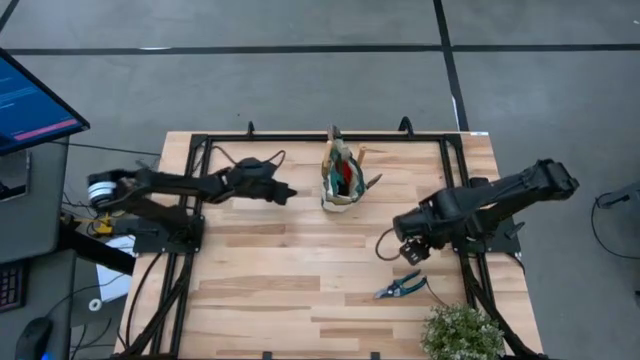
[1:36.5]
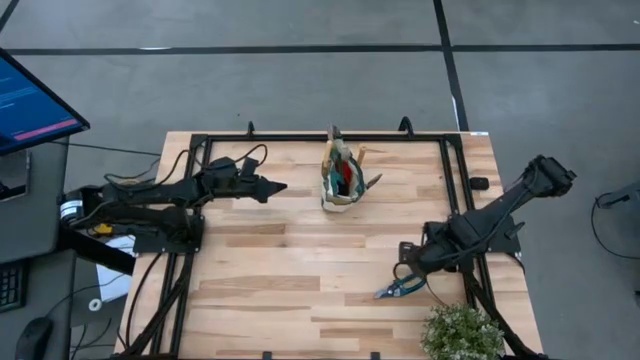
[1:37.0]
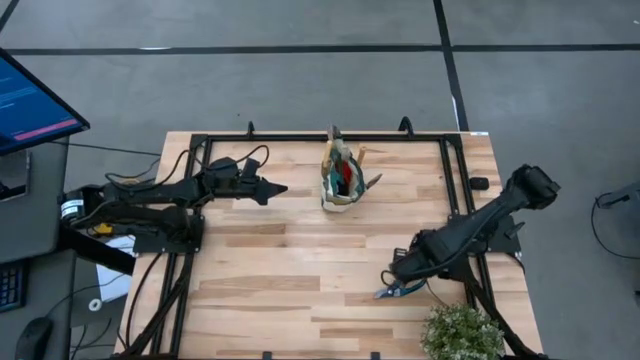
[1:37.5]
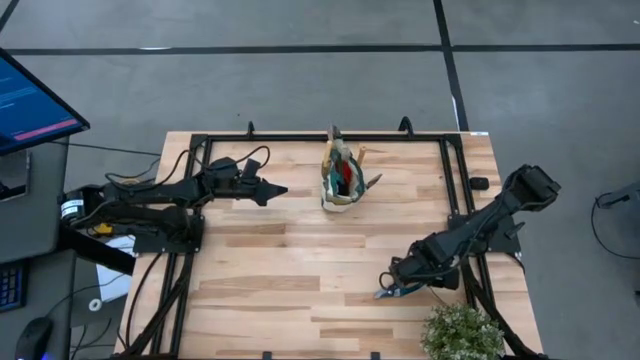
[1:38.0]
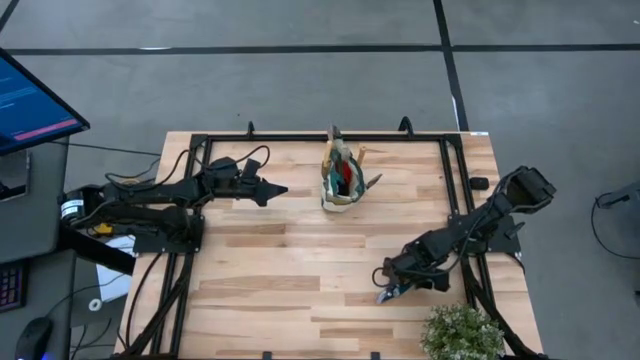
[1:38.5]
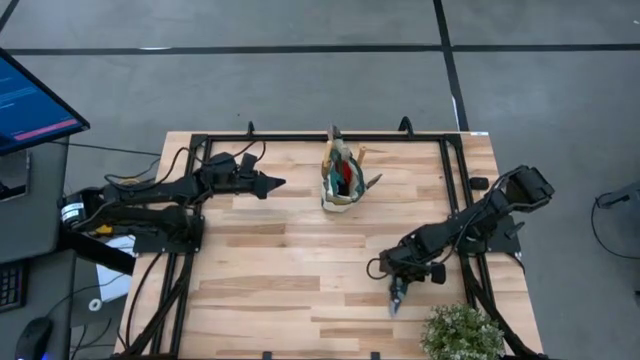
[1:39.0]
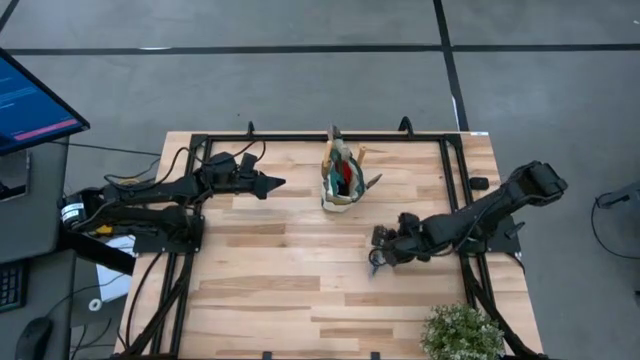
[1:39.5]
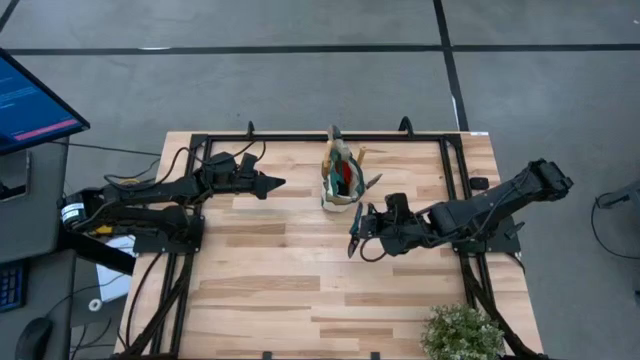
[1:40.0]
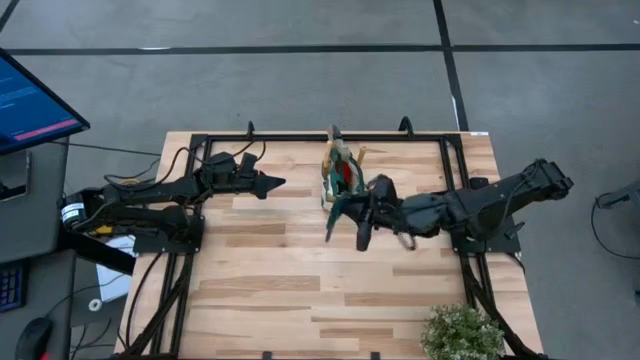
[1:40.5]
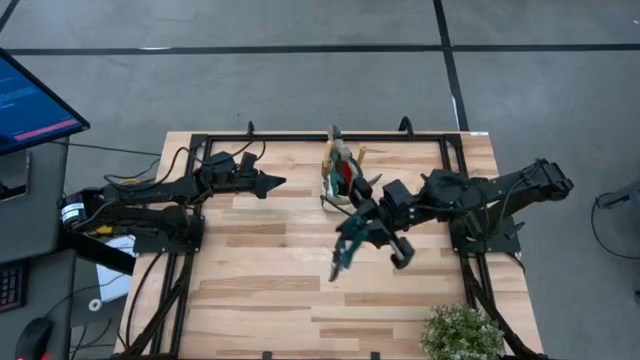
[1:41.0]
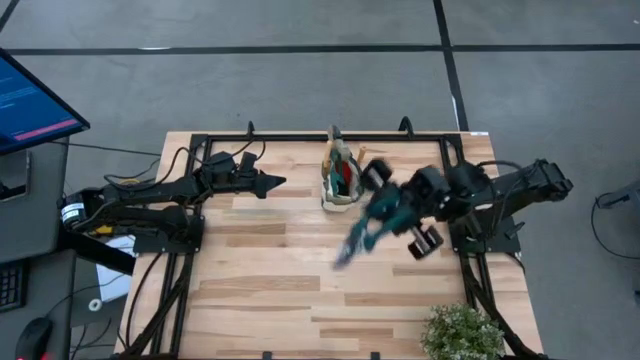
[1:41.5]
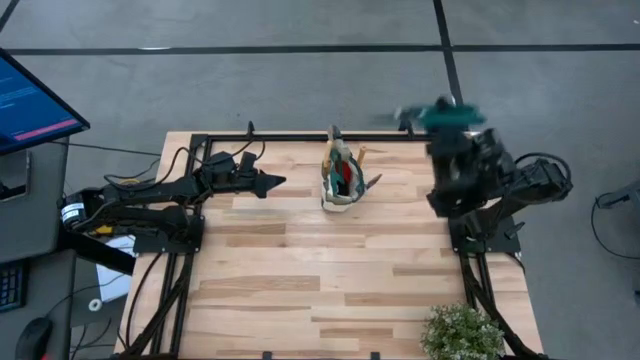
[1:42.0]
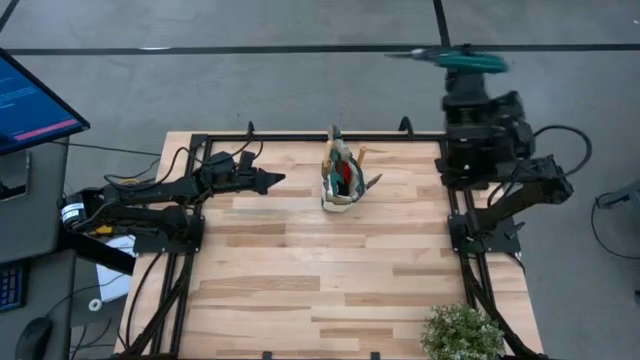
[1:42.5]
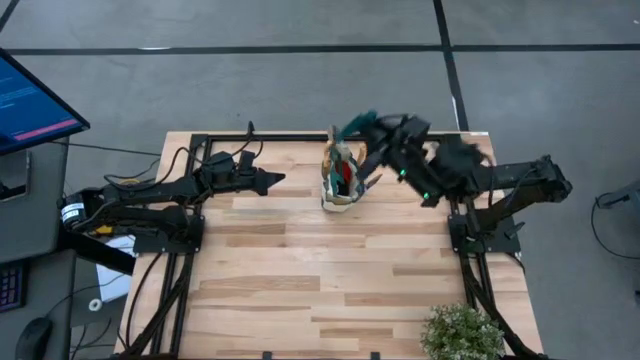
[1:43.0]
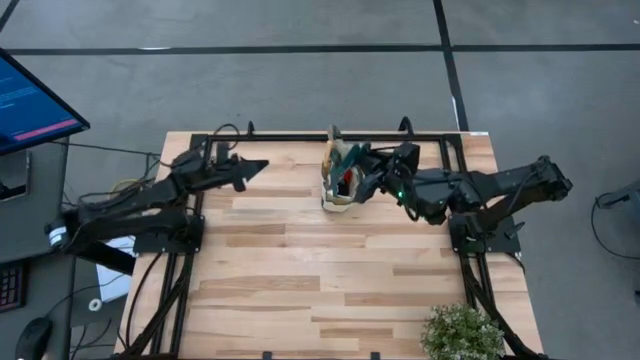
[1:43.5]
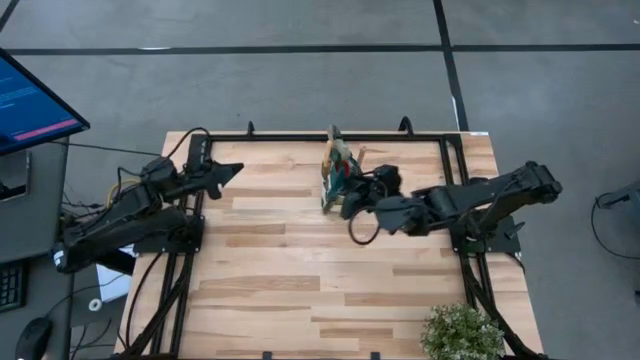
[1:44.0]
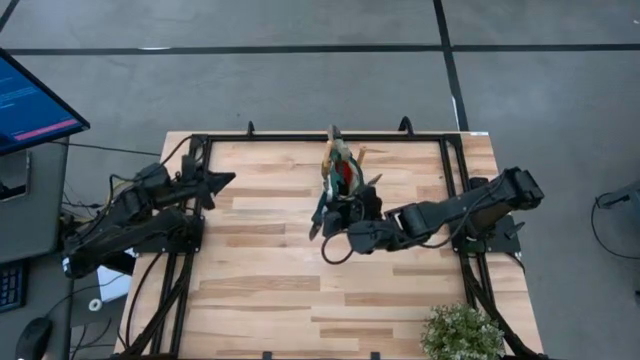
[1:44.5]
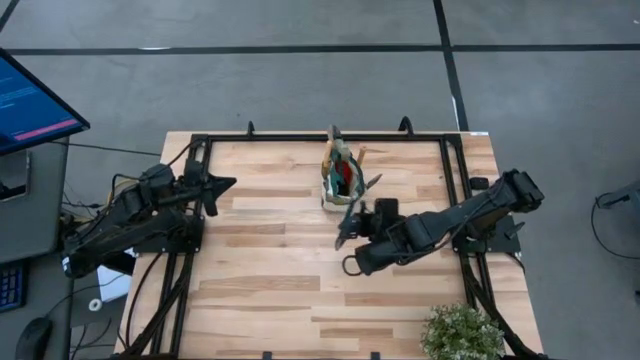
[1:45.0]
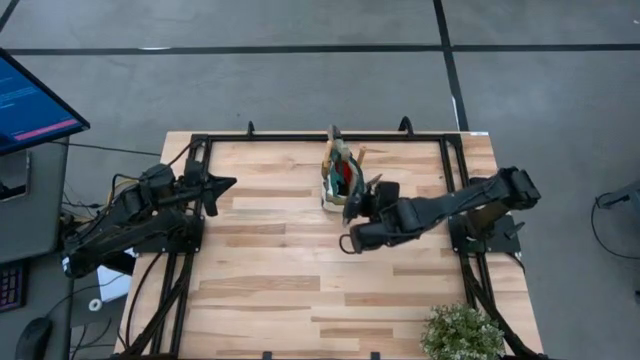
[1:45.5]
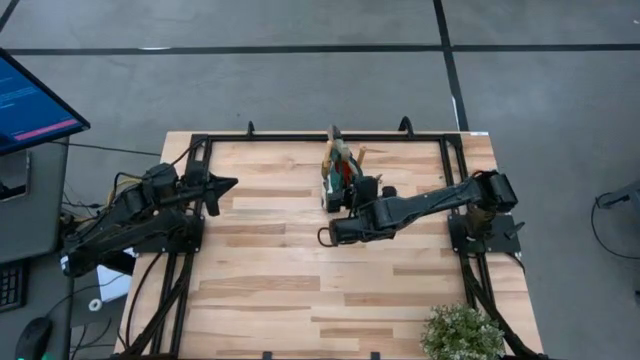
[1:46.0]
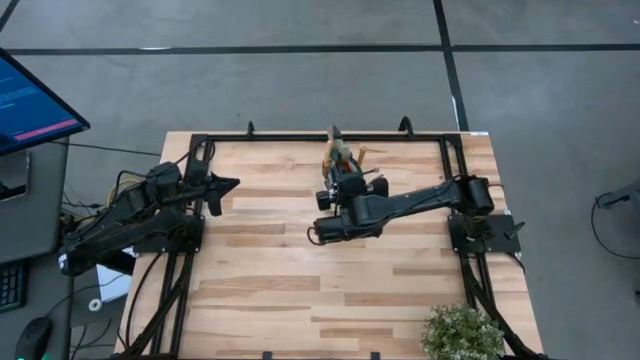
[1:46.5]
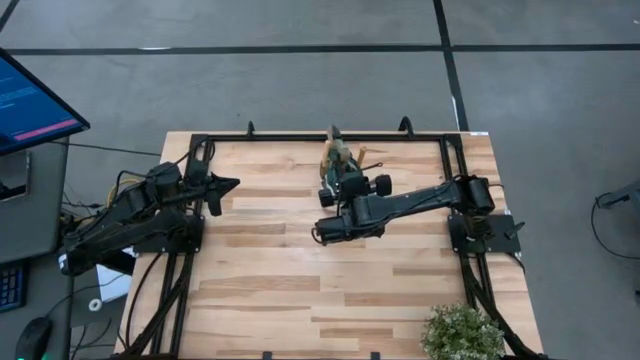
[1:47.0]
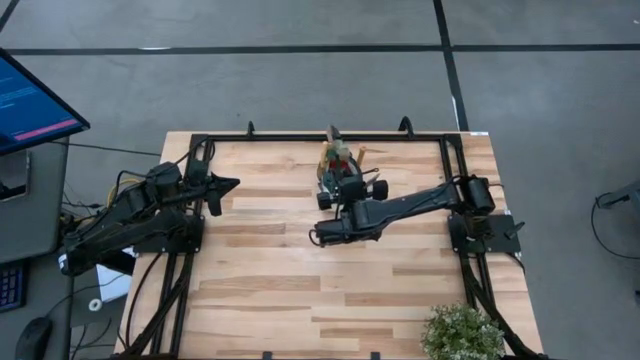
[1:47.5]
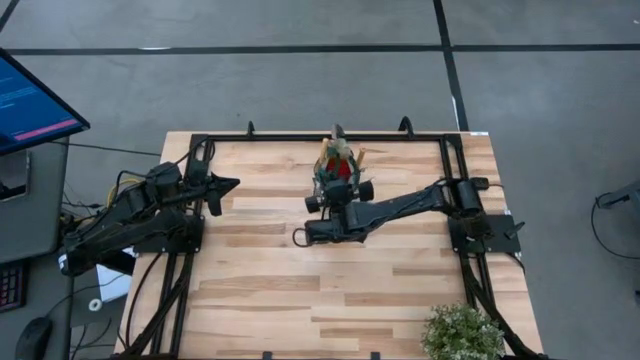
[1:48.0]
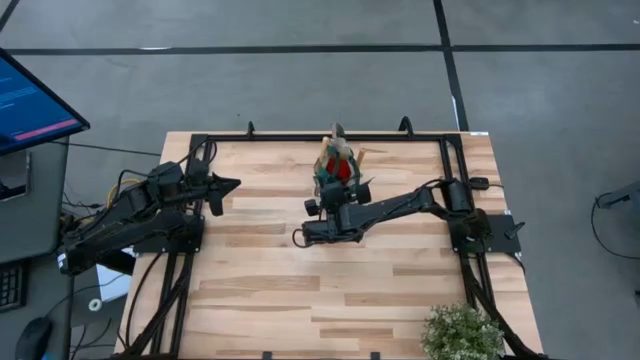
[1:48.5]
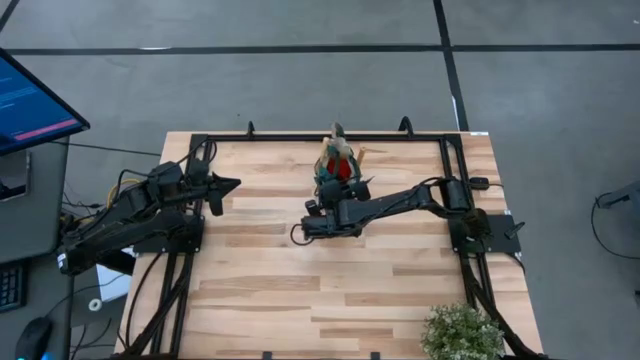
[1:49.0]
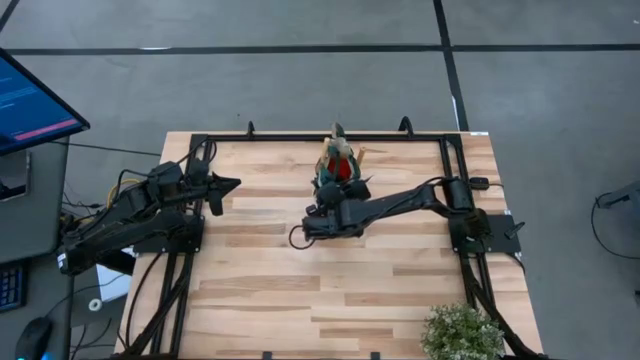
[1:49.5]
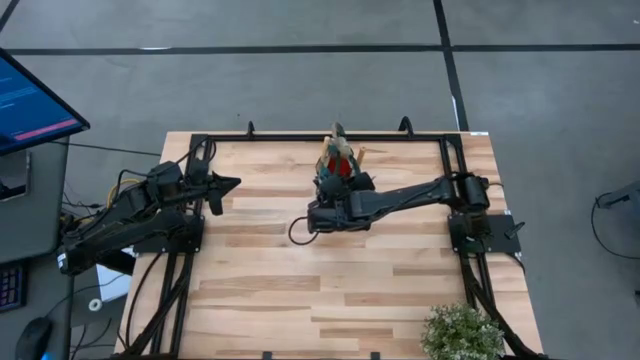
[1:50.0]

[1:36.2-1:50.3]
Task: Pick & Place Garden tools in Gardening bag
Put the green shear scissor into the gardening bag

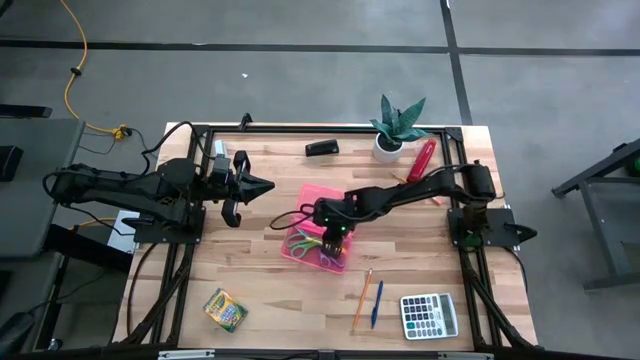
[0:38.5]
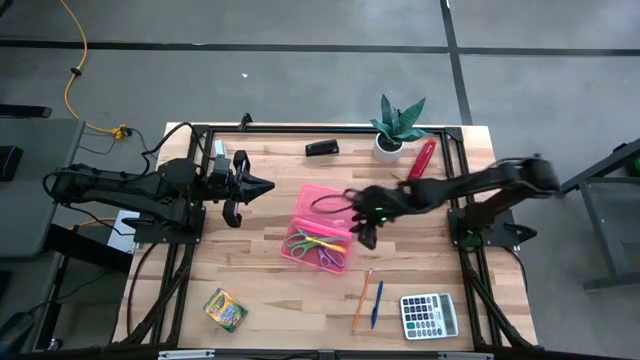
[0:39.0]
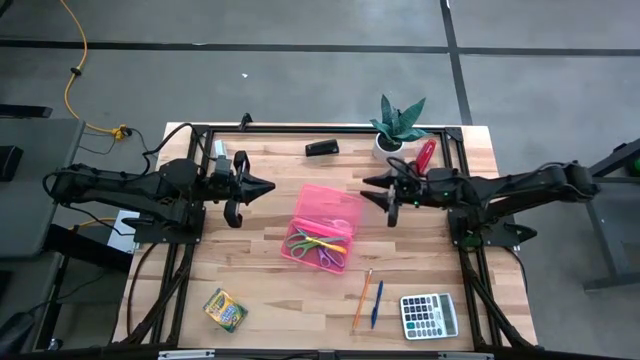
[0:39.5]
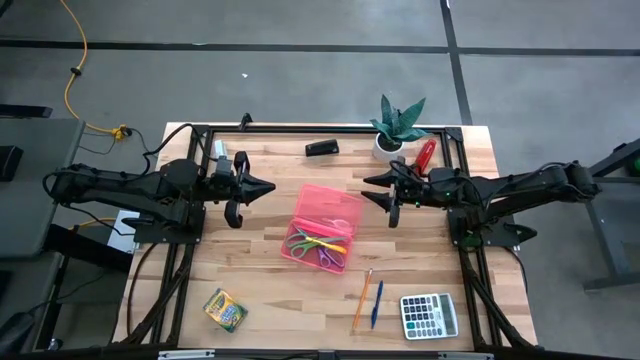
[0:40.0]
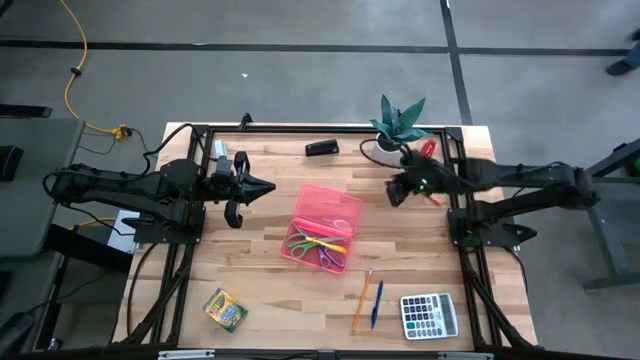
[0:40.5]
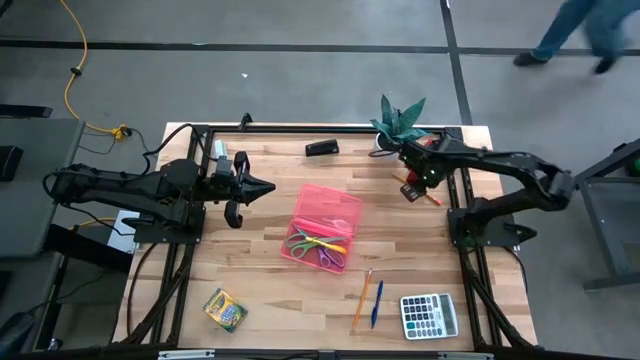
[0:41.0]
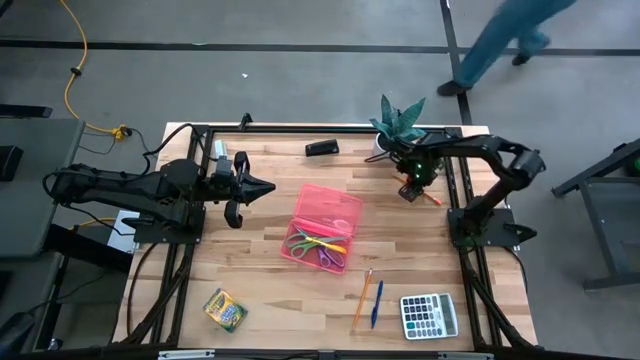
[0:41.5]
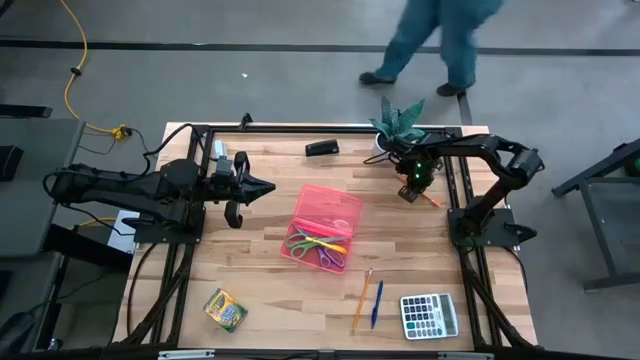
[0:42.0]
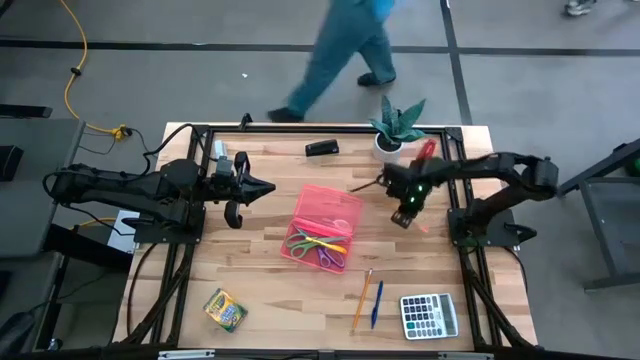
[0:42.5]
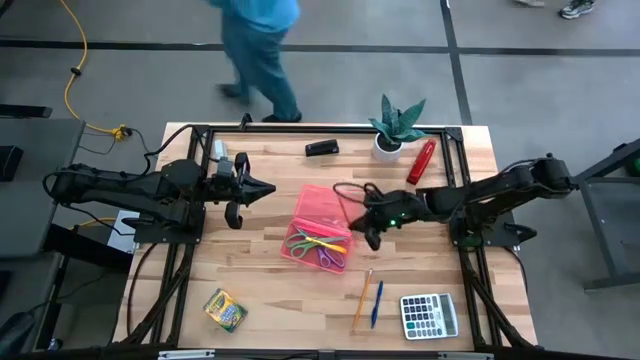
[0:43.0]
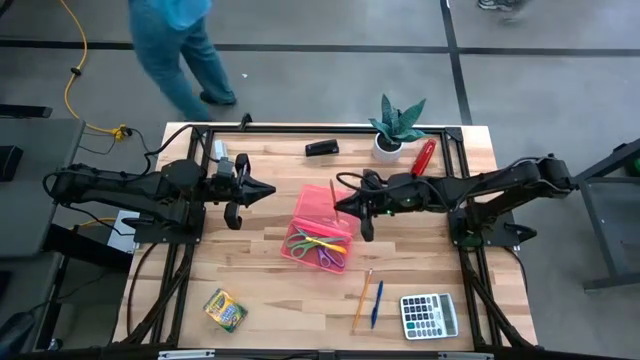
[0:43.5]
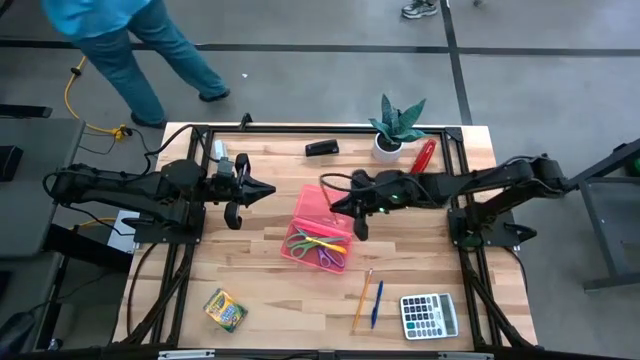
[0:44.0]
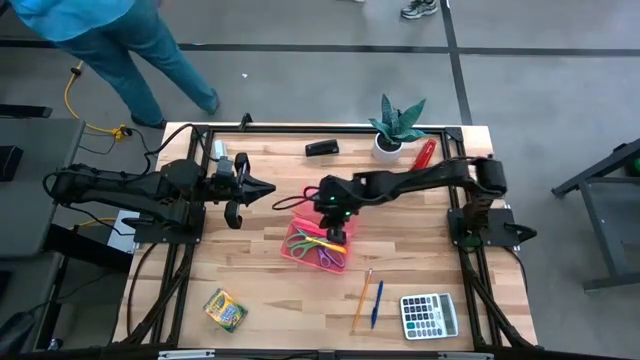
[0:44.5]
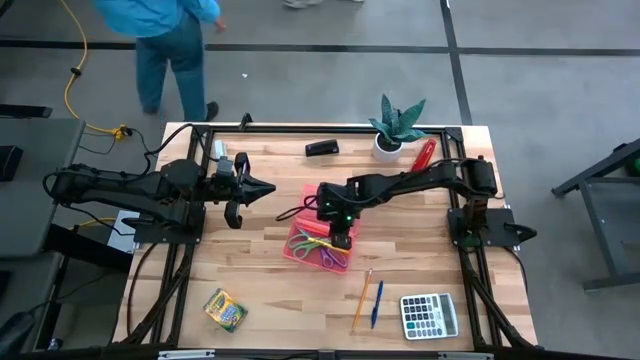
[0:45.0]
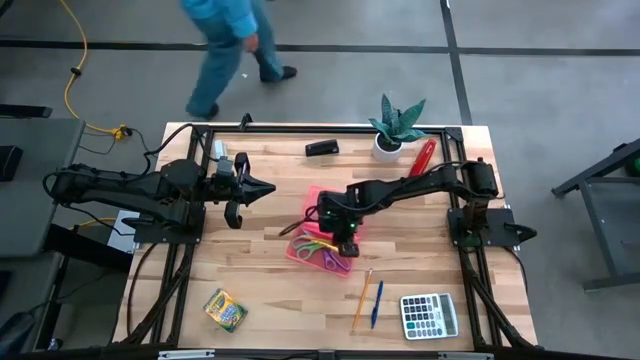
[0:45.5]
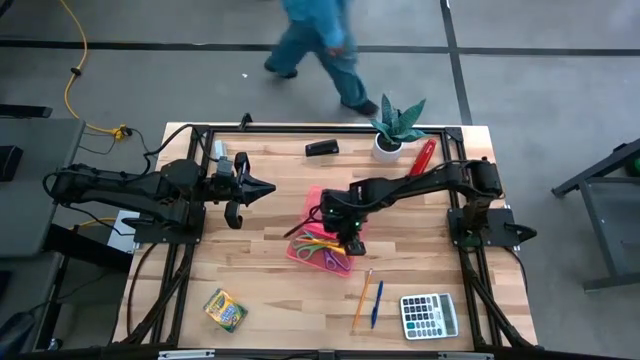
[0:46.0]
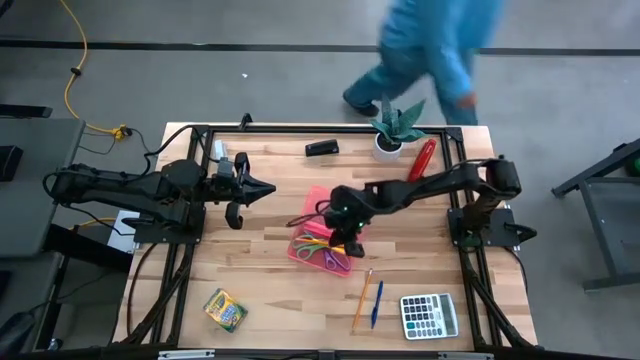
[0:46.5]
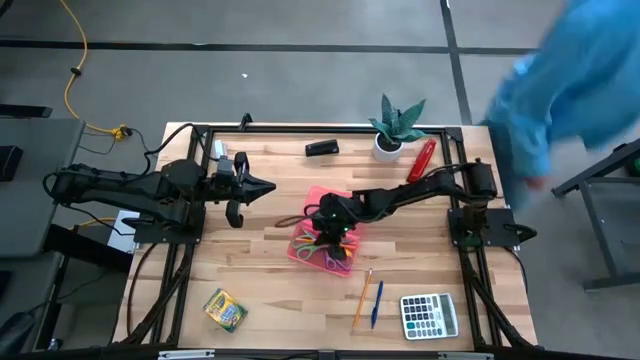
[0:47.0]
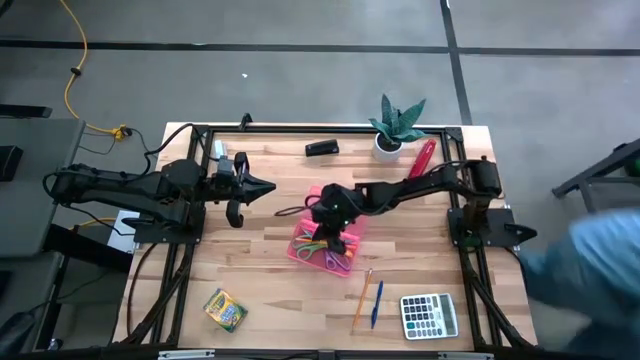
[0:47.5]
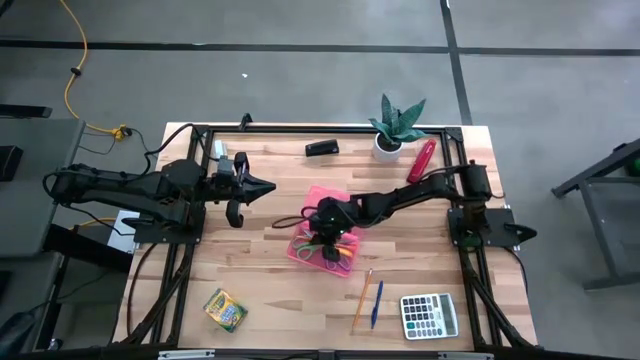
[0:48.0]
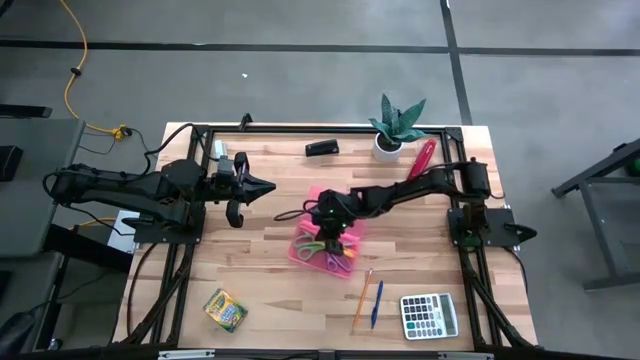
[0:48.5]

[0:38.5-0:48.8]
Task: Pick & place school supplies into a supply box
Put the top orange pencil into the pink supply box
